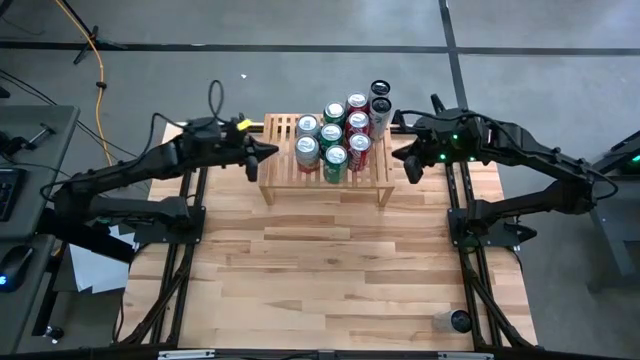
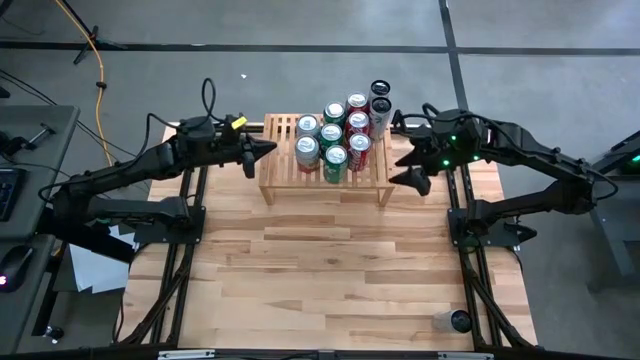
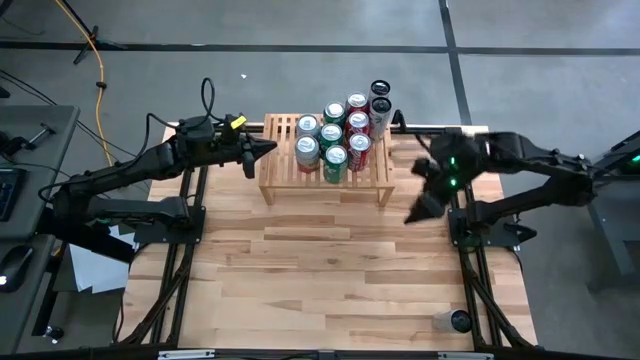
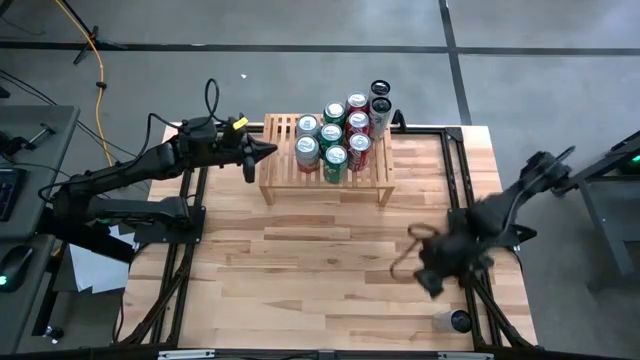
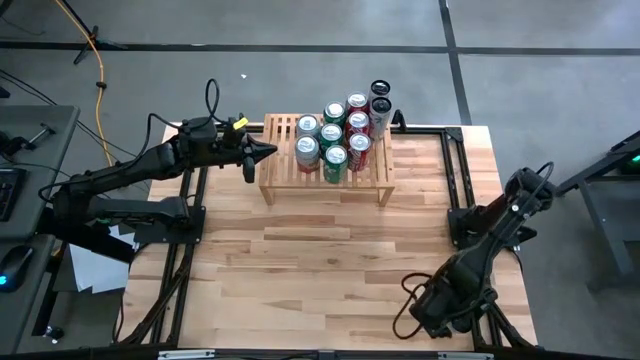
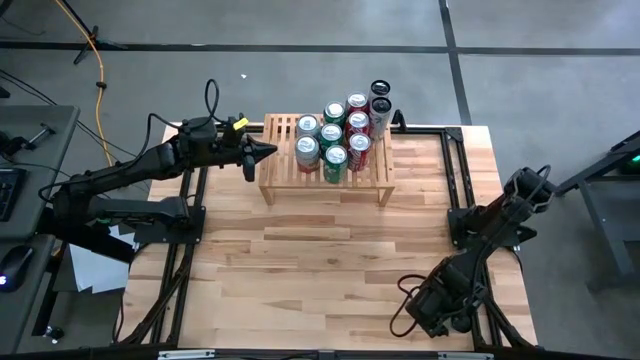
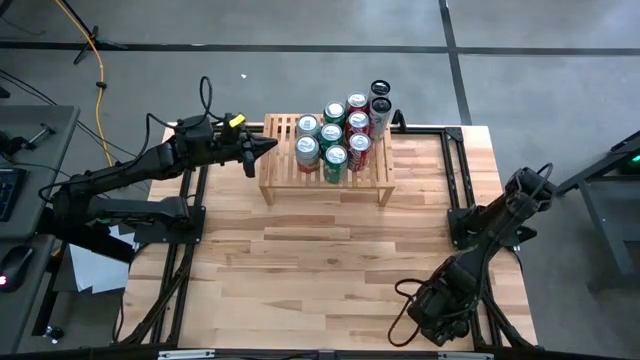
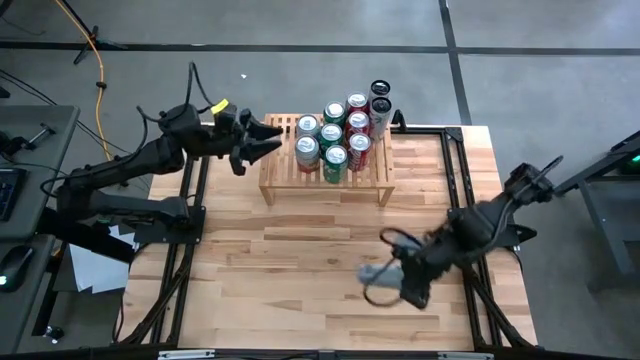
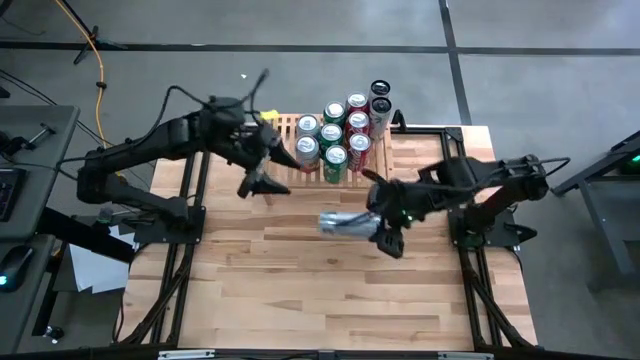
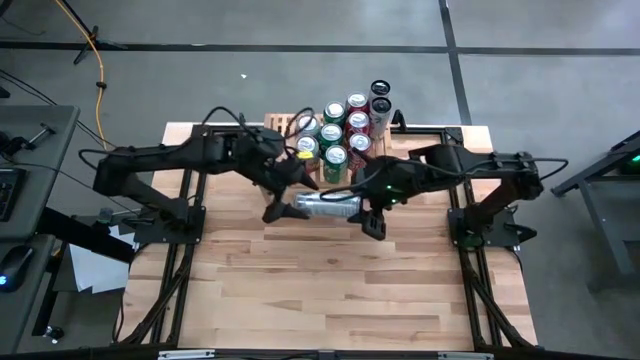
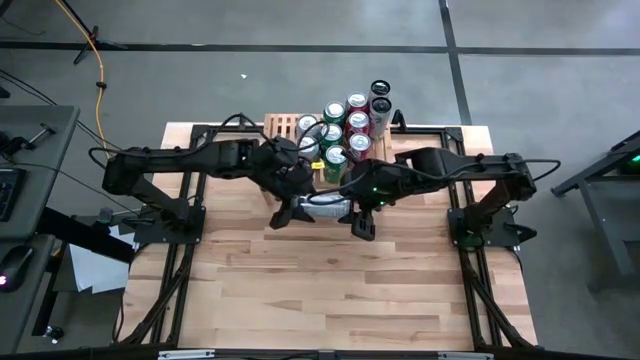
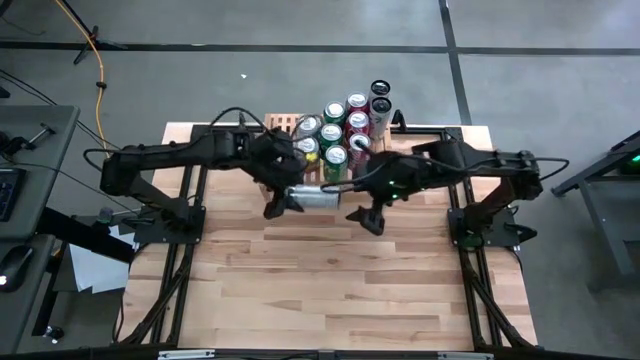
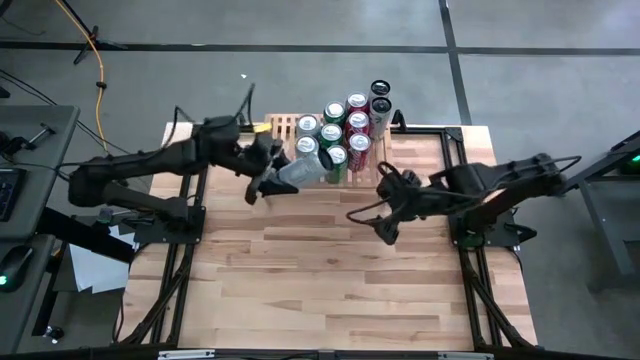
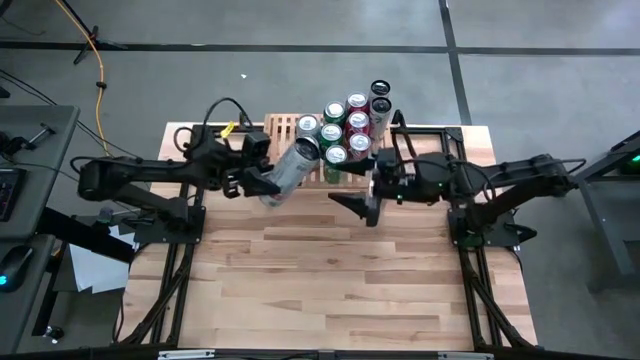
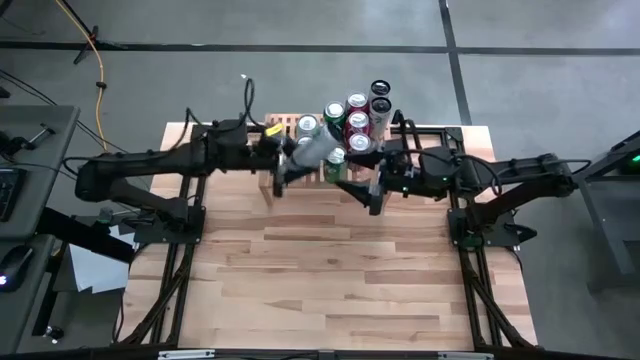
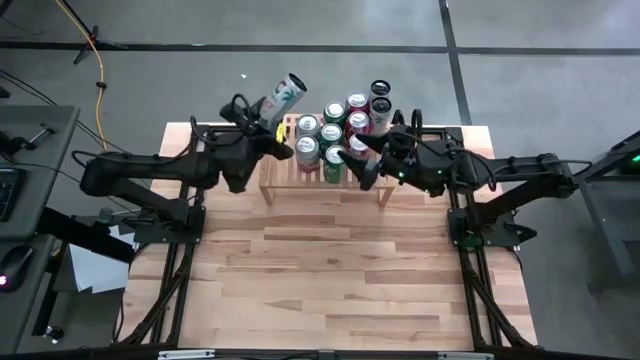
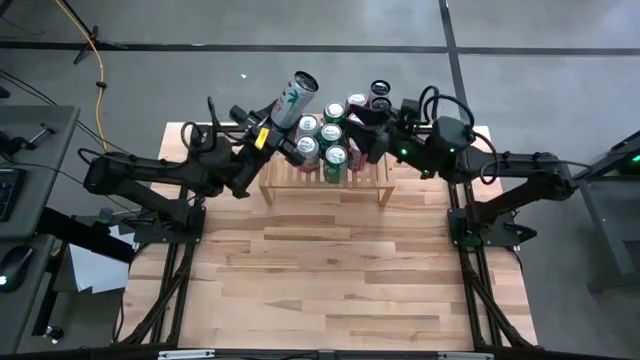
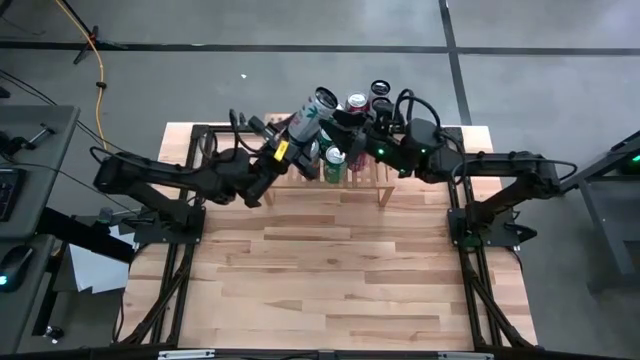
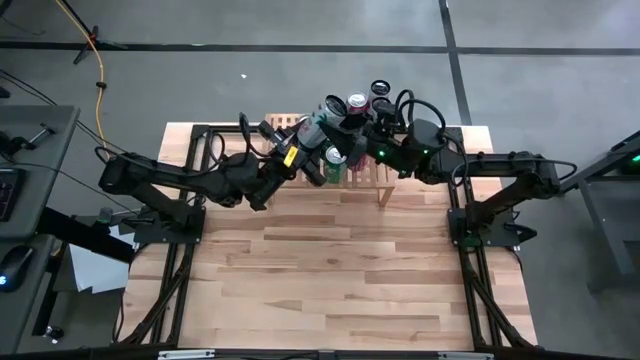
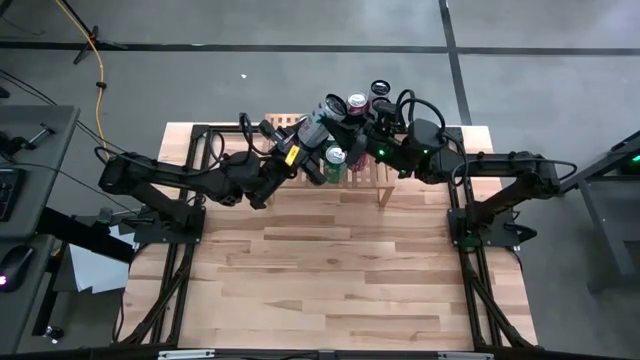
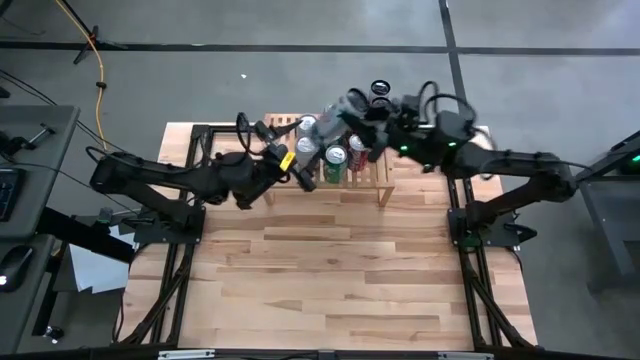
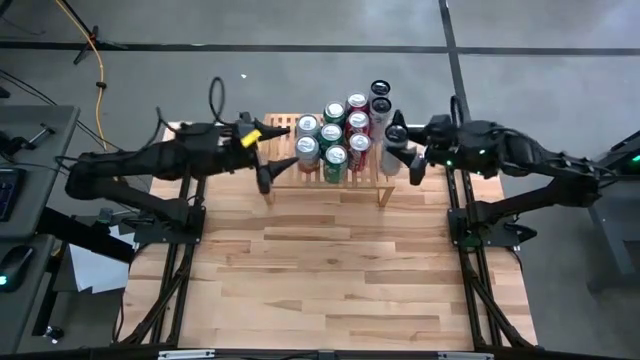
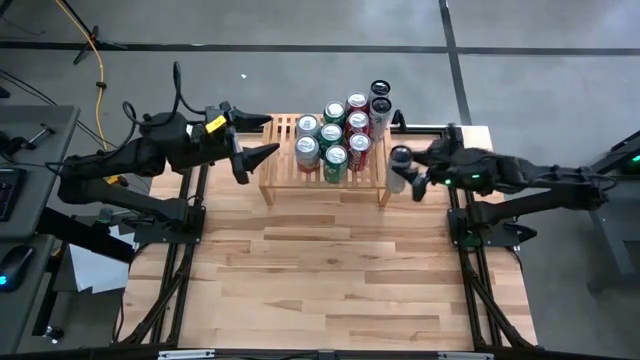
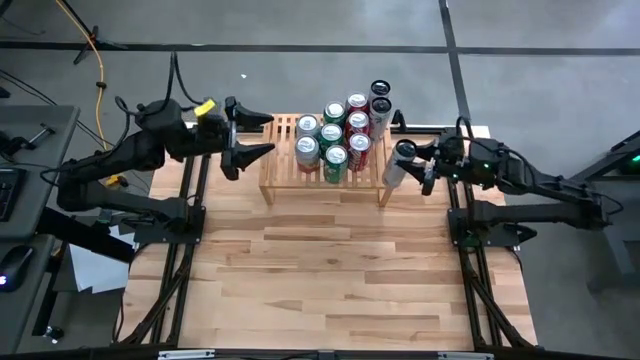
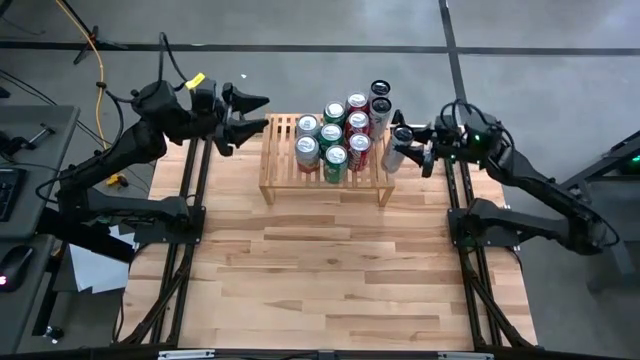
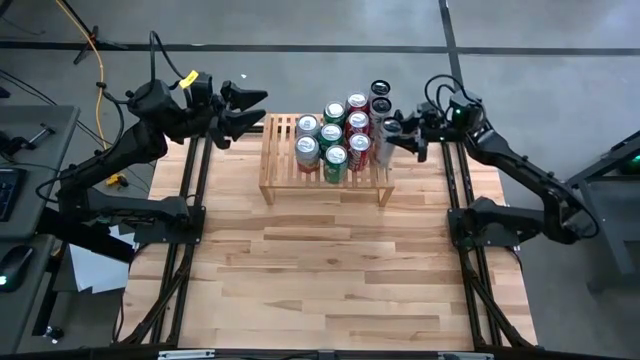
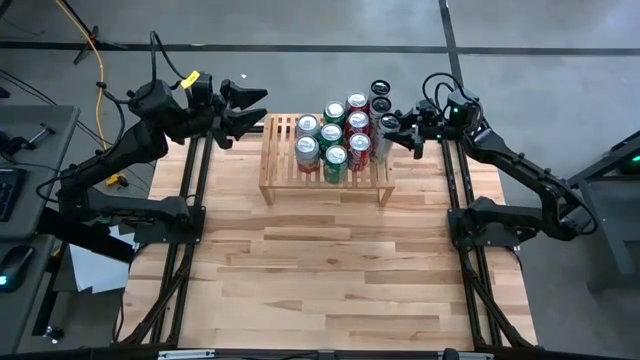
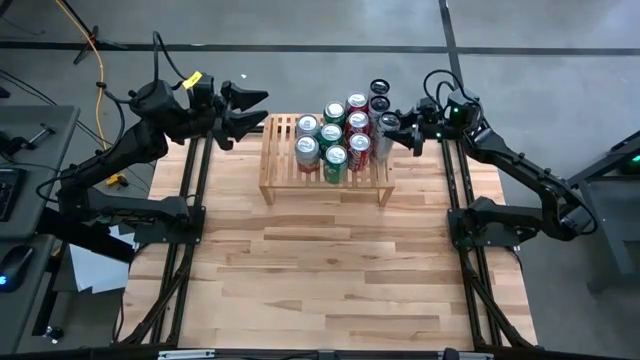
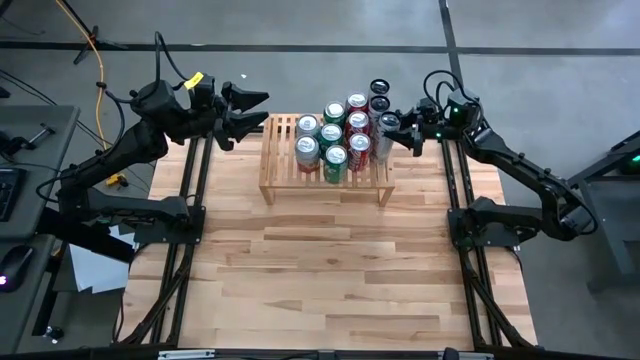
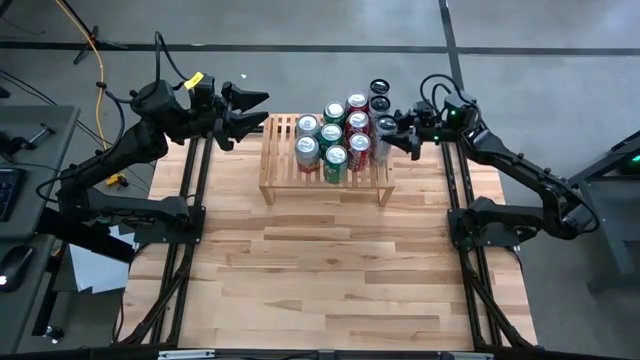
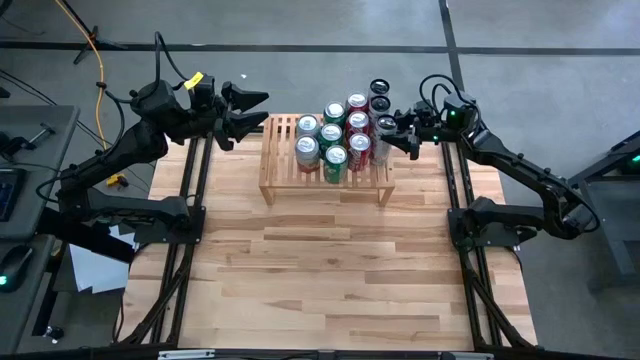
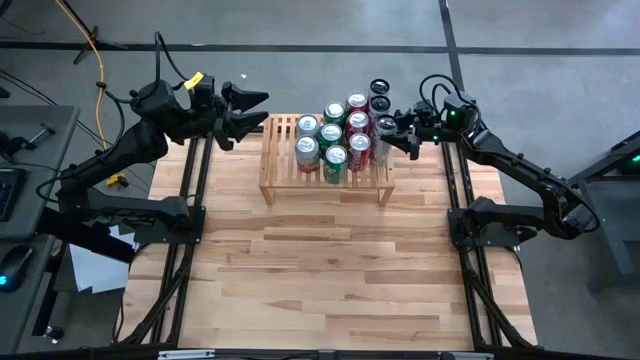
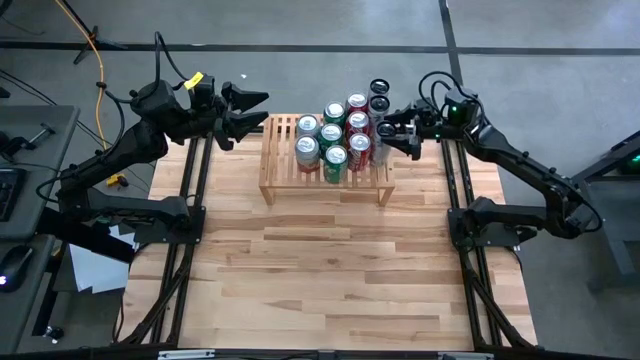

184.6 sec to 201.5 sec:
Task: Place canned beverage on shelf
Put the white pink soda can on the shelf aligned with the other white pink soda cans

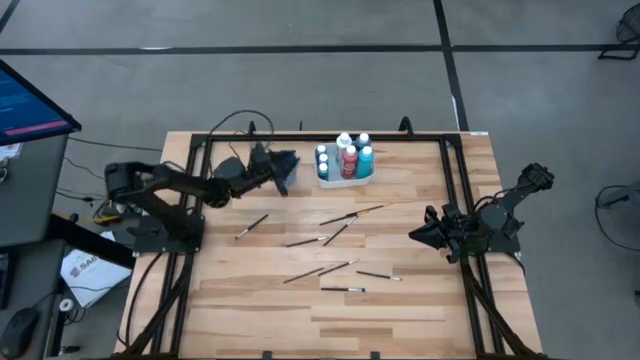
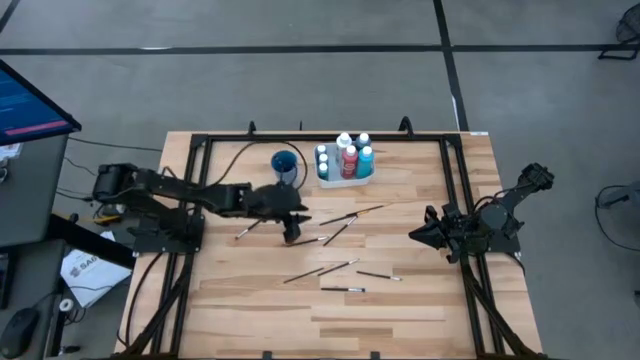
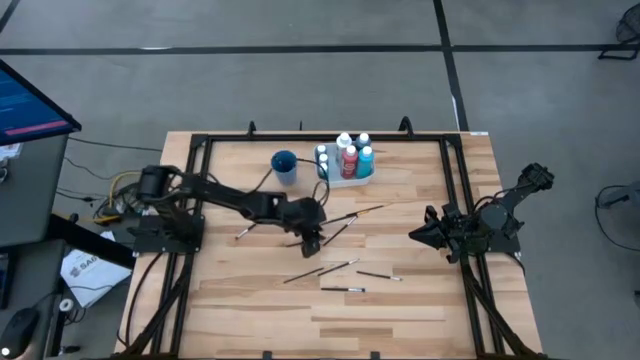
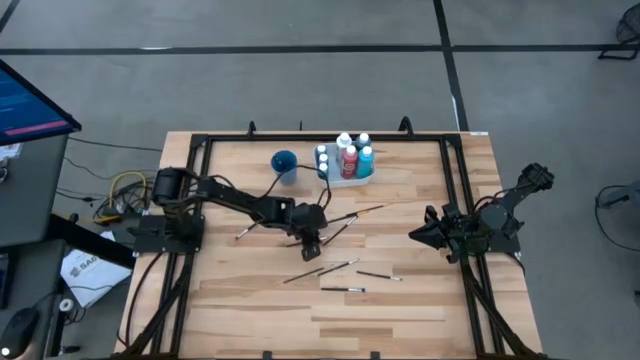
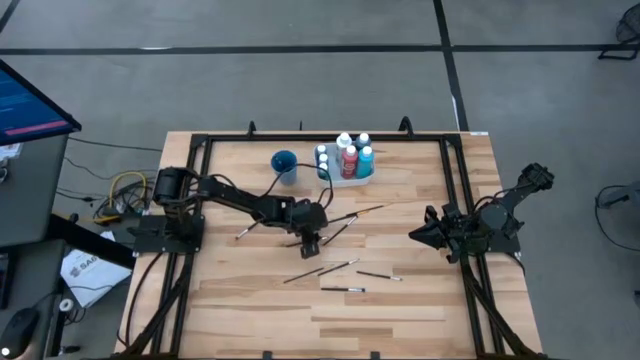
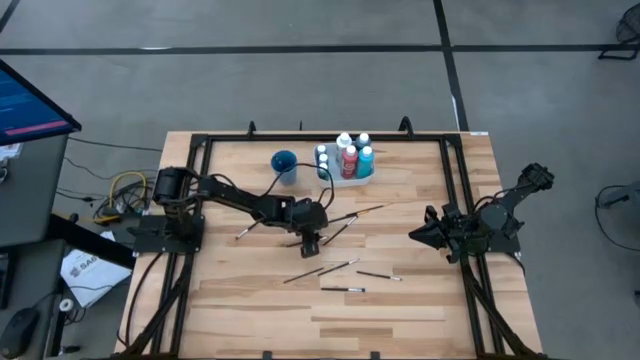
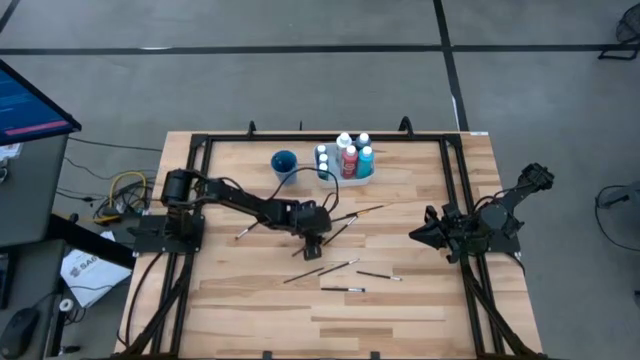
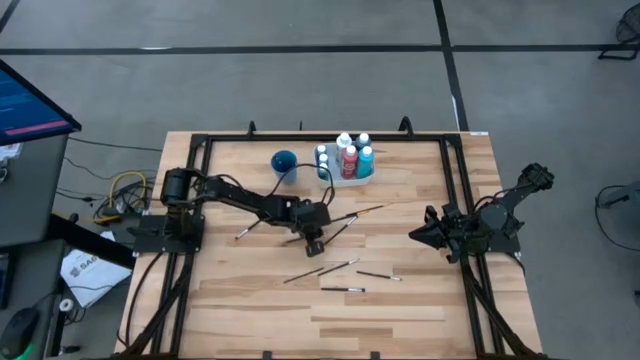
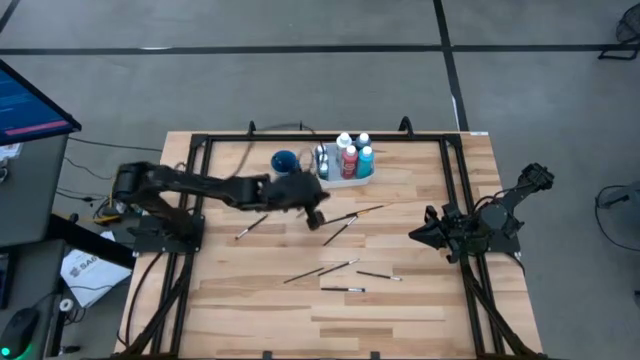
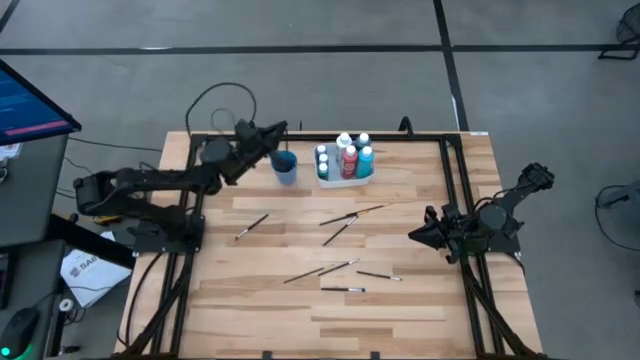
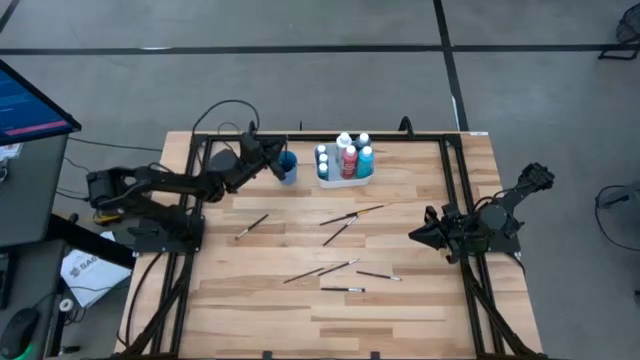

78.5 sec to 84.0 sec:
Task: Pick & Place Paint Supplies
Put the silver and black paint brush into the blue cup
